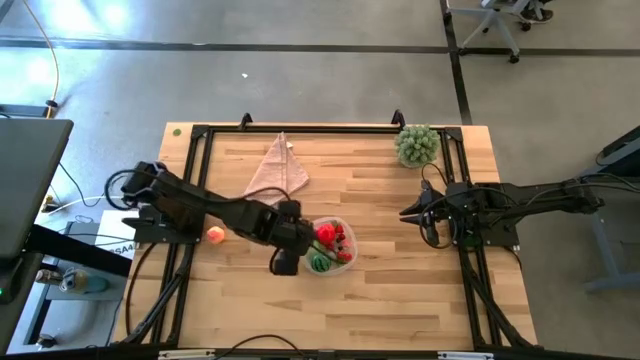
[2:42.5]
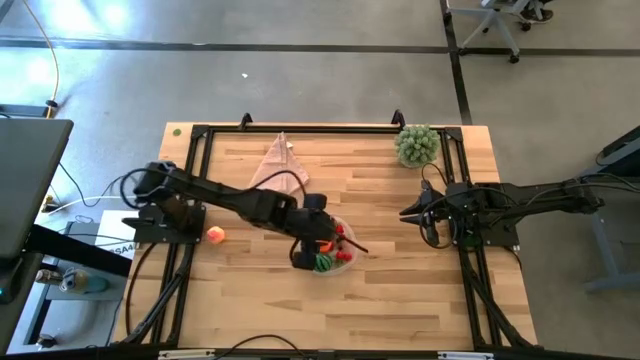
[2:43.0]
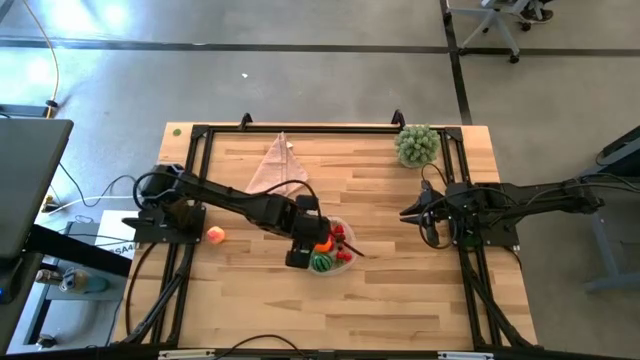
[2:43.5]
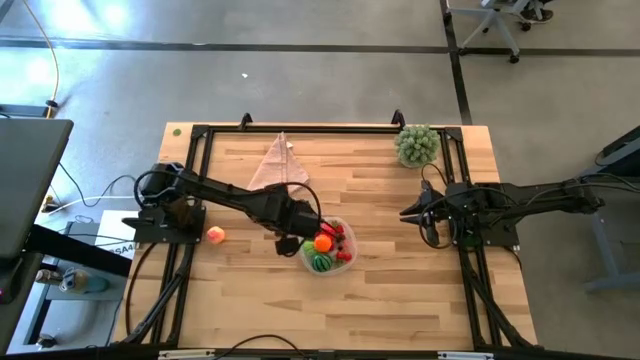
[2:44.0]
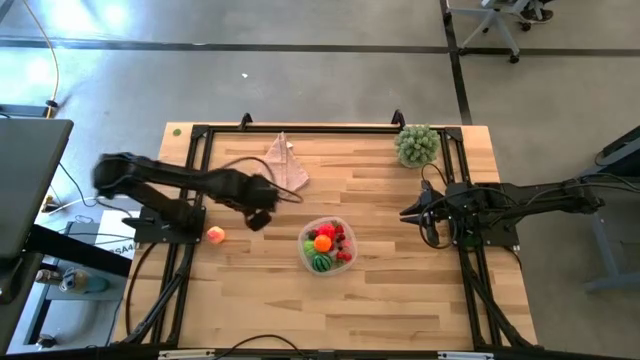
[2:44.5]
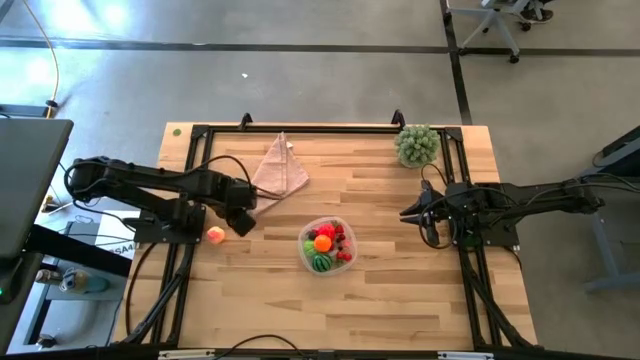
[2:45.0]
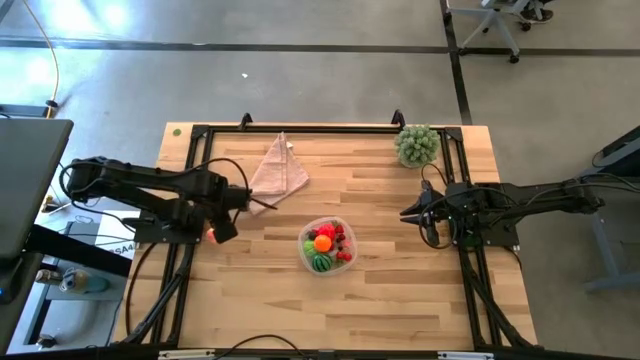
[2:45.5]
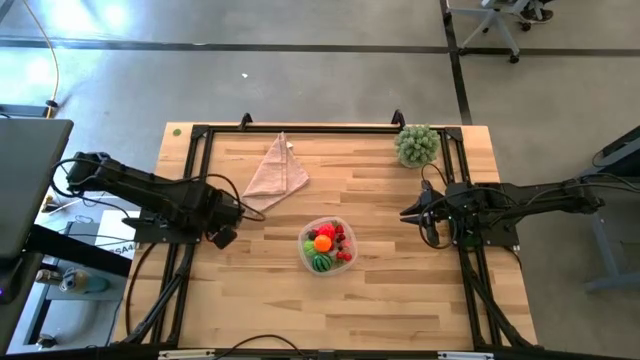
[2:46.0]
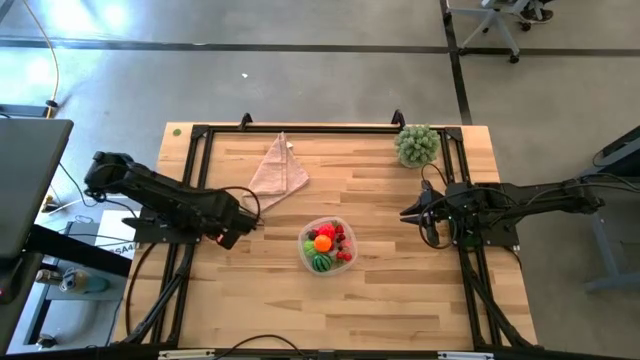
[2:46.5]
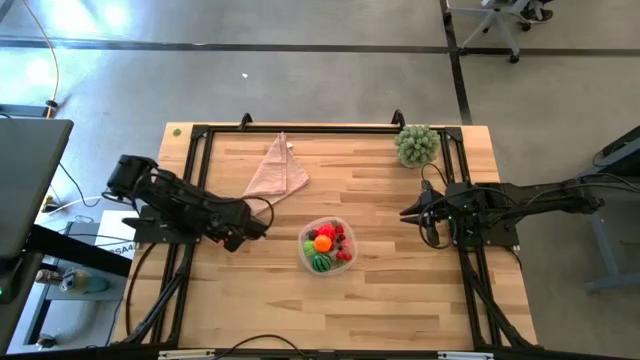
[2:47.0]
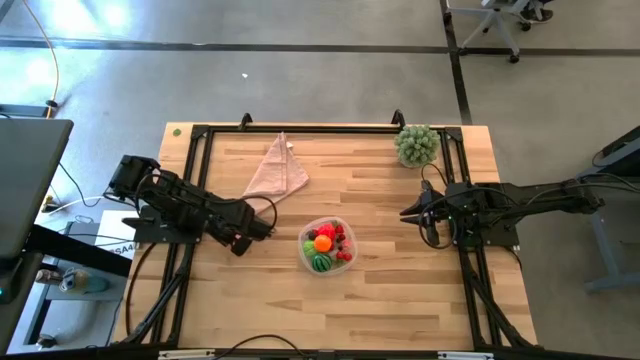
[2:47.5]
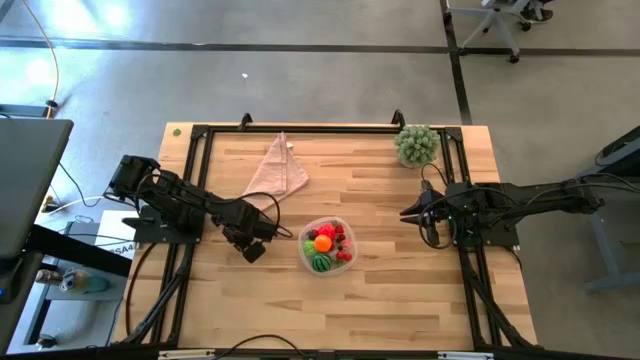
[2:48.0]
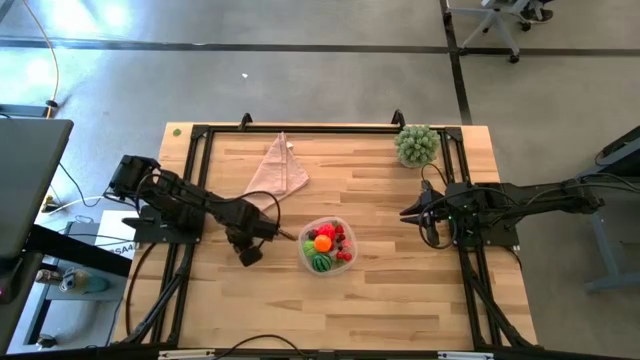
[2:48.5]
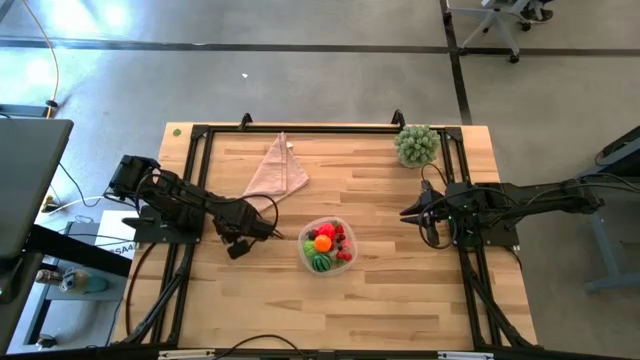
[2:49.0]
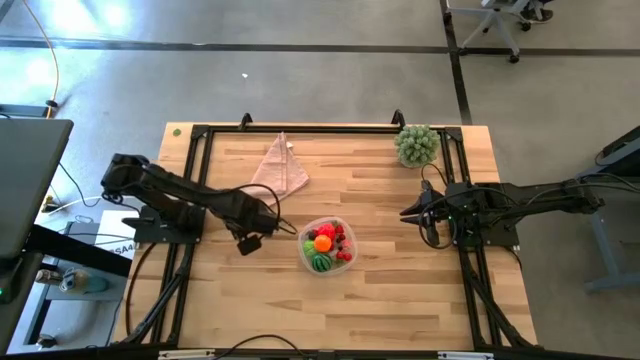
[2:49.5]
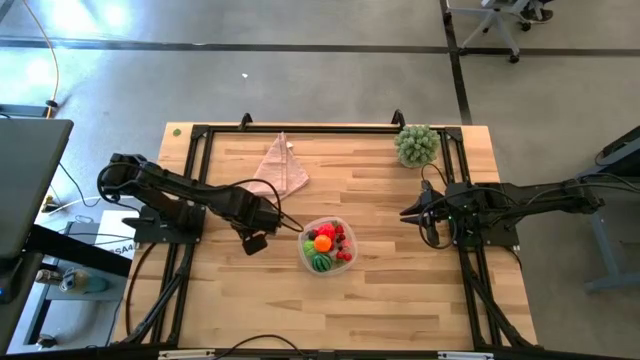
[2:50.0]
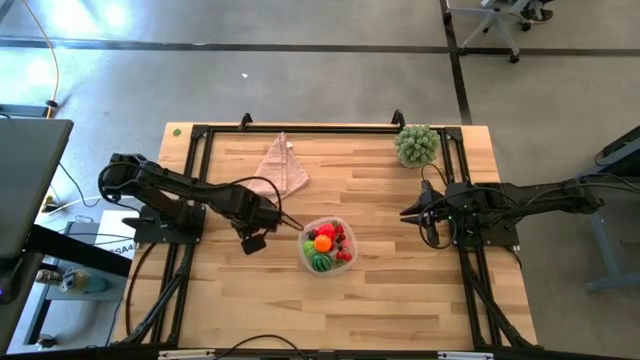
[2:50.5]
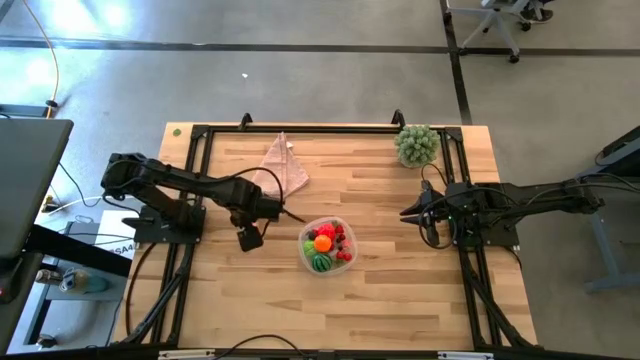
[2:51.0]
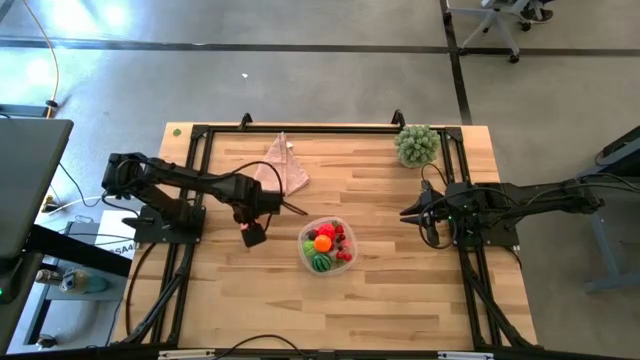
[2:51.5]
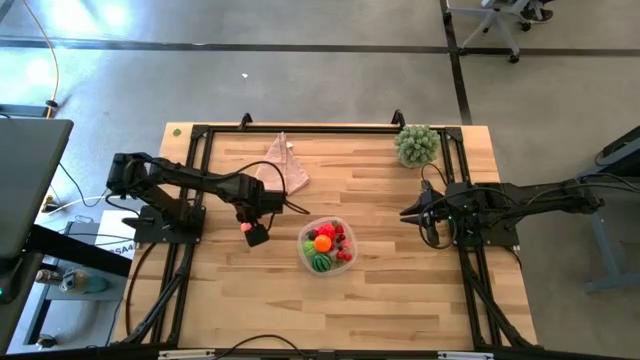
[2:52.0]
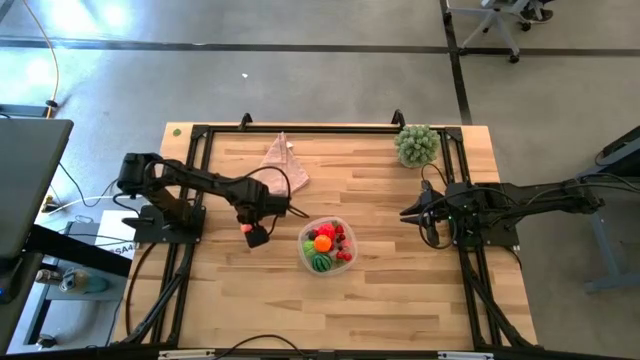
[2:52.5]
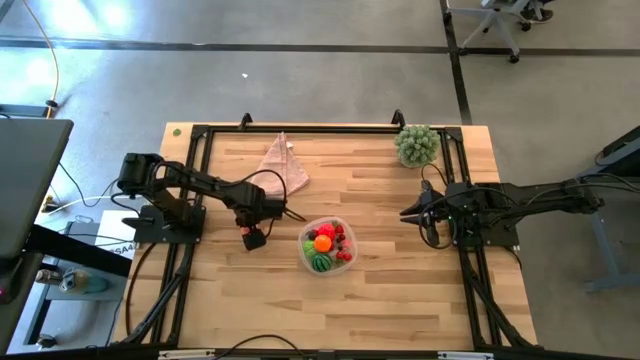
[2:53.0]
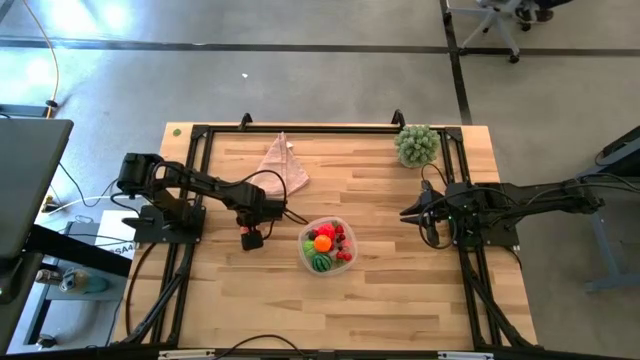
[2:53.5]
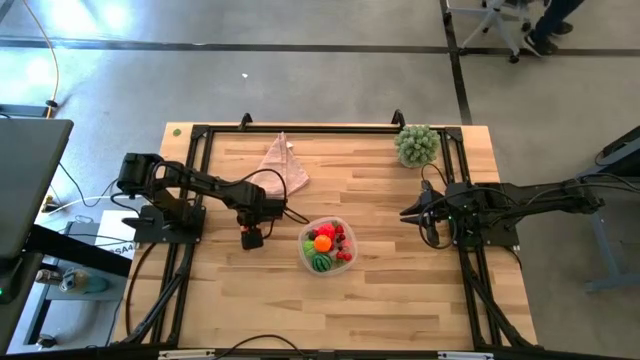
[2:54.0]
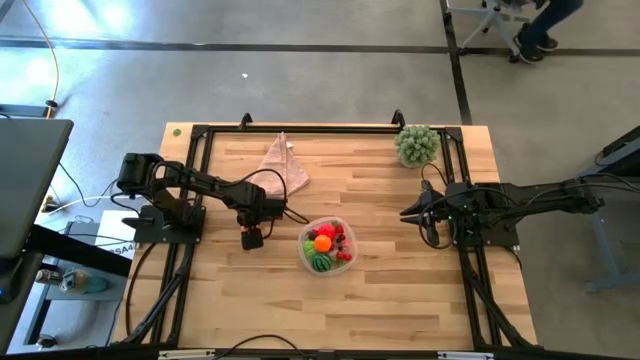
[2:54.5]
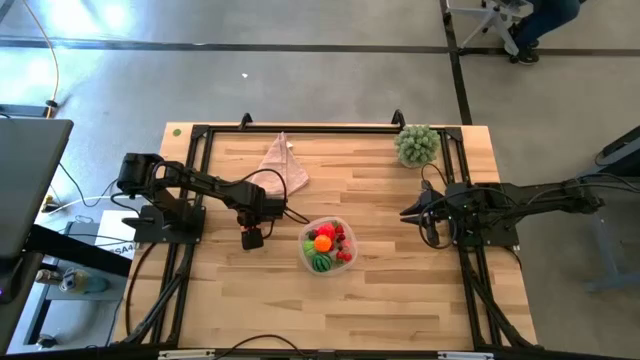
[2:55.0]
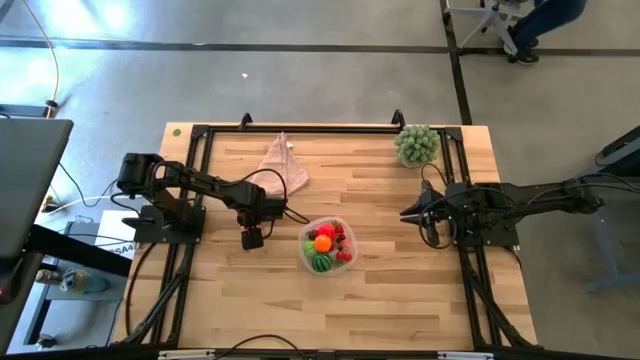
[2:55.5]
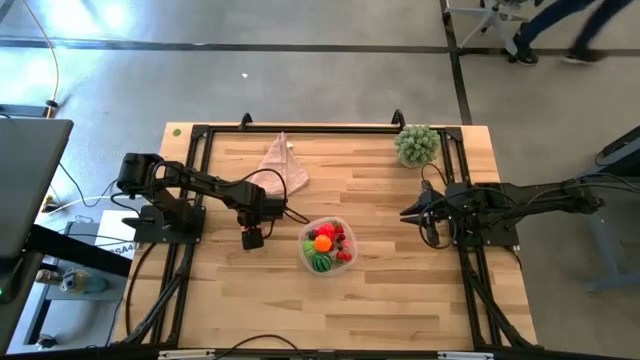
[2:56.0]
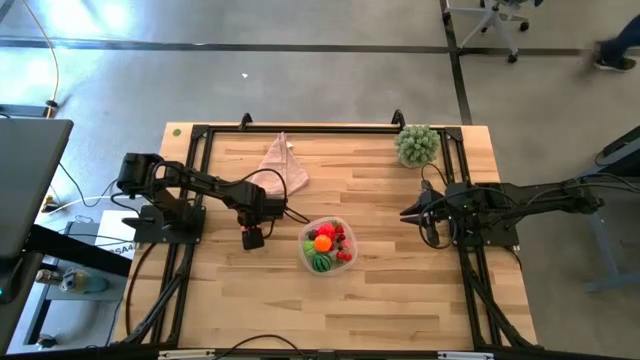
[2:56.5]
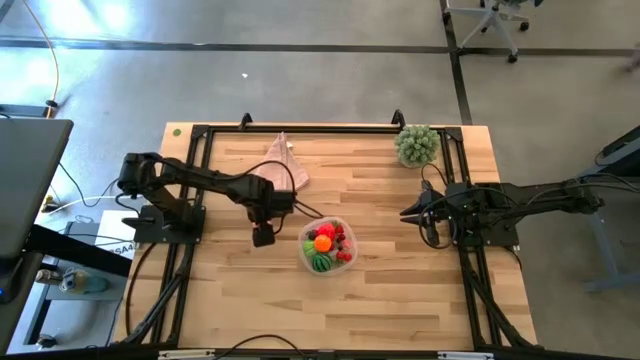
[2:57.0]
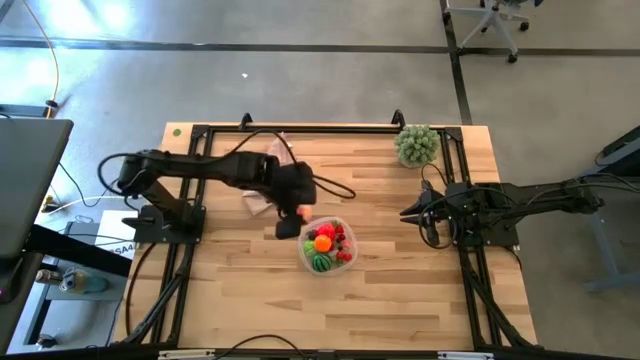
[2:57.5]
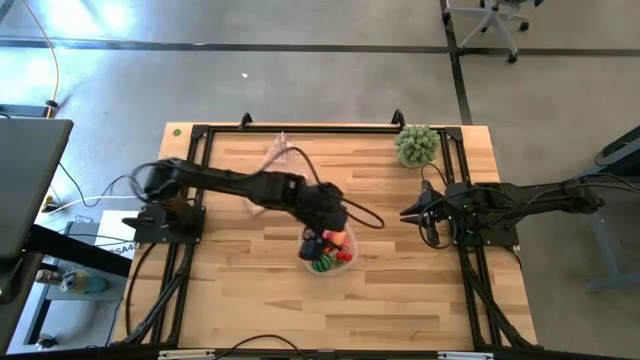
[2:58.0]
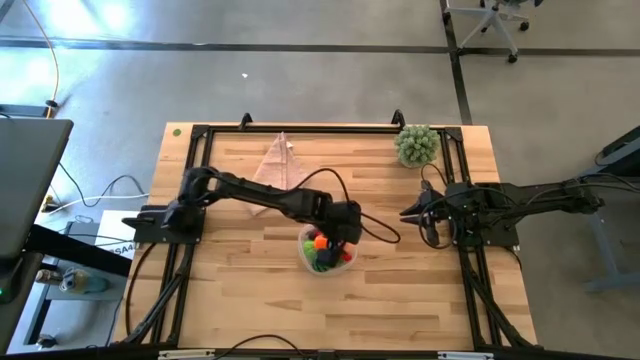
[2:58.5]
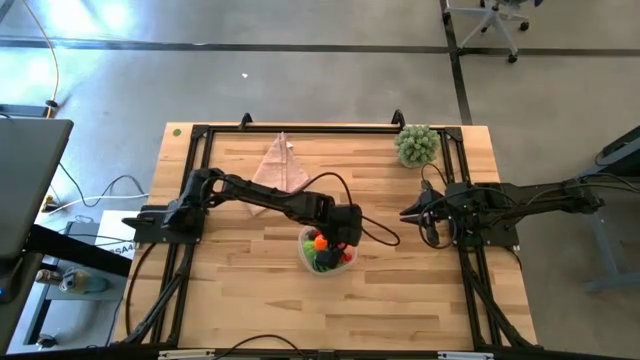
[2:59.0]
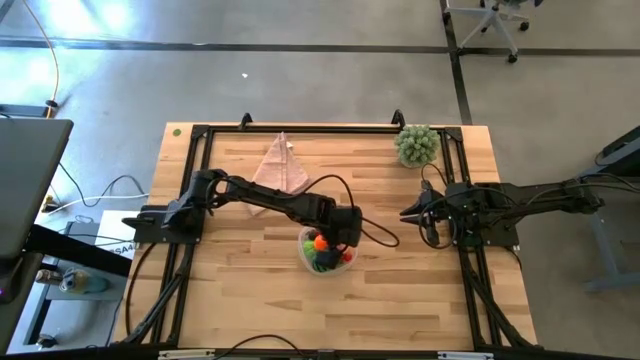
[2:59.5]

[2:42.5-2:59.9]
Task: Pick and placing Produce into tupperware
Put the peach into the transparent bin

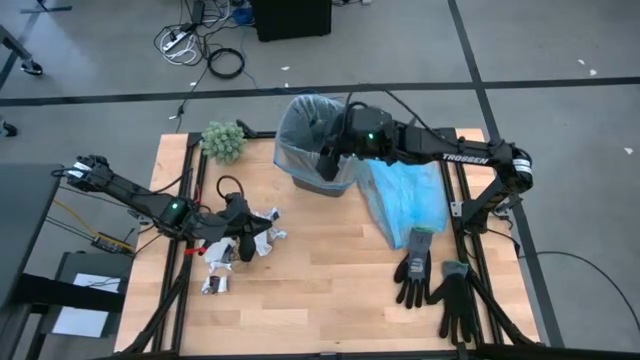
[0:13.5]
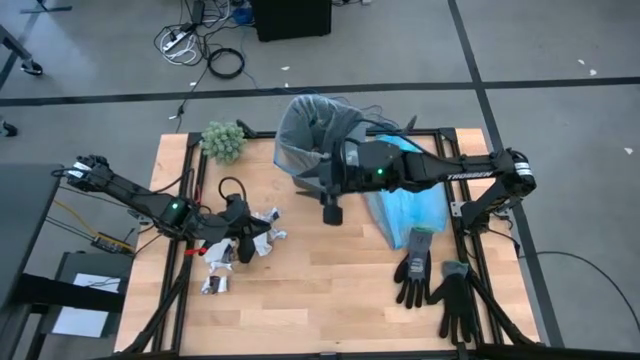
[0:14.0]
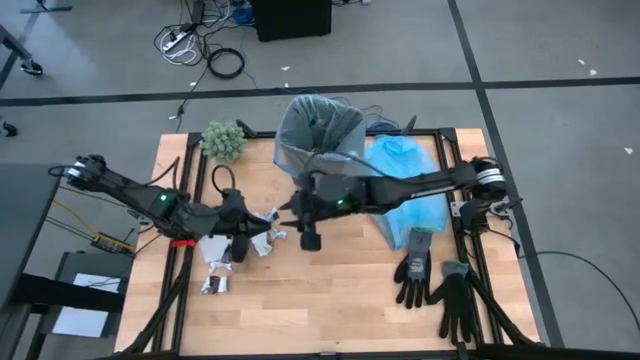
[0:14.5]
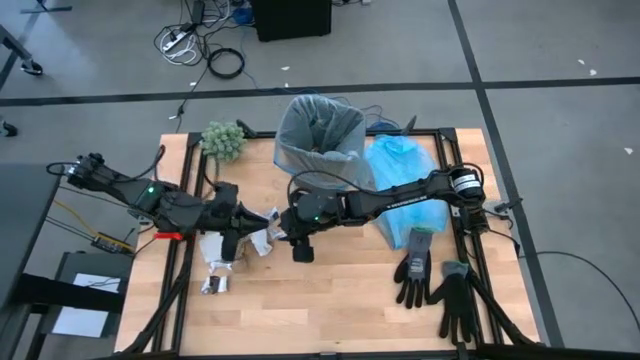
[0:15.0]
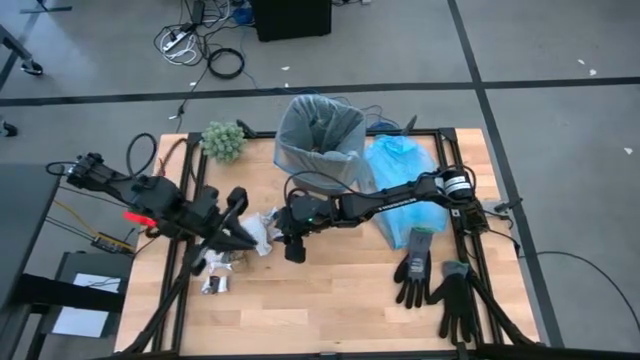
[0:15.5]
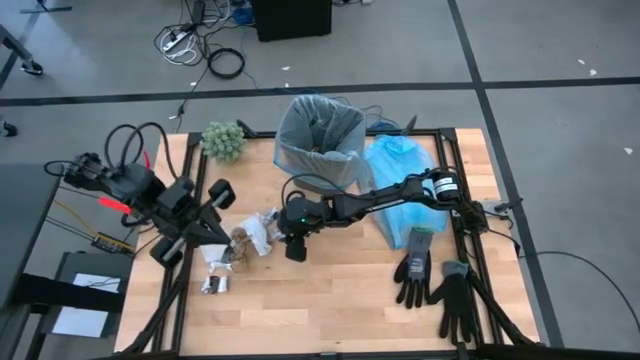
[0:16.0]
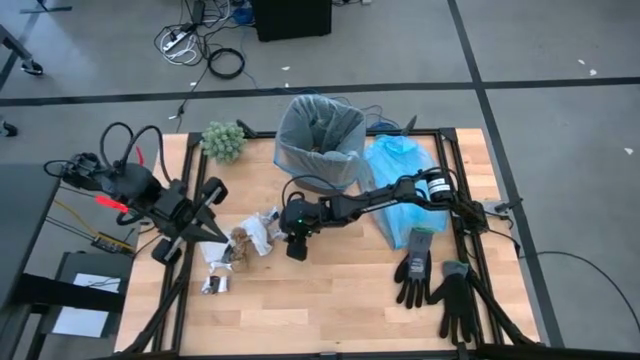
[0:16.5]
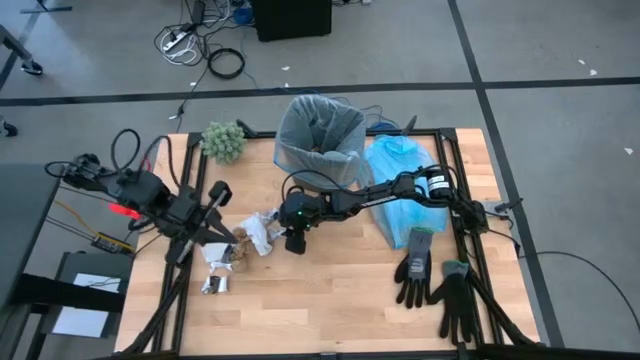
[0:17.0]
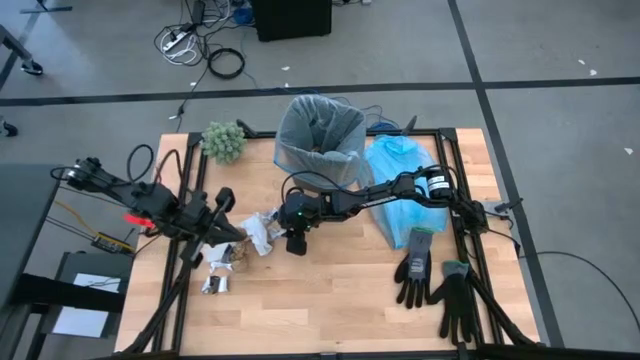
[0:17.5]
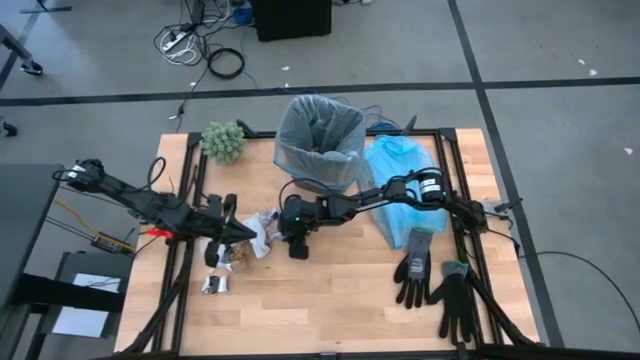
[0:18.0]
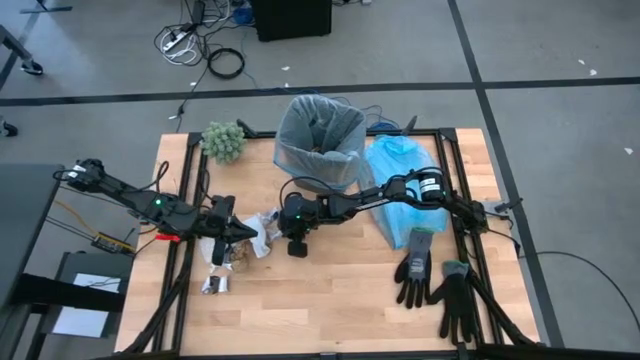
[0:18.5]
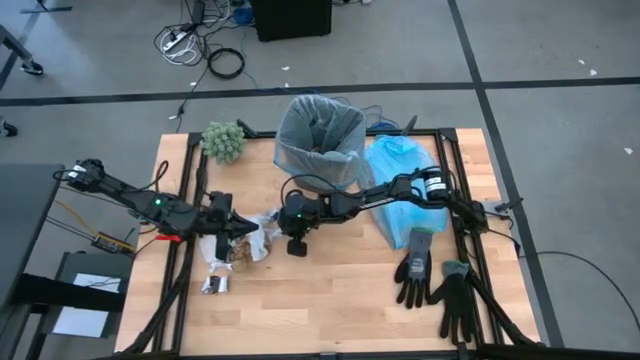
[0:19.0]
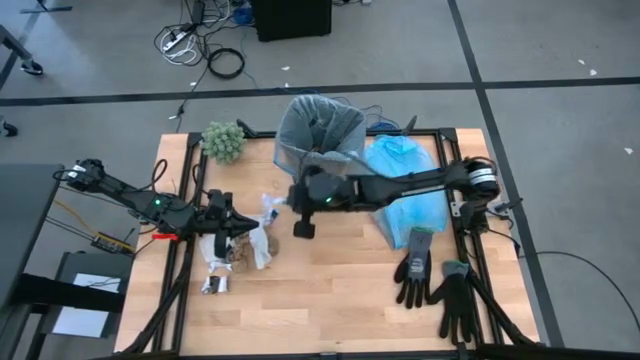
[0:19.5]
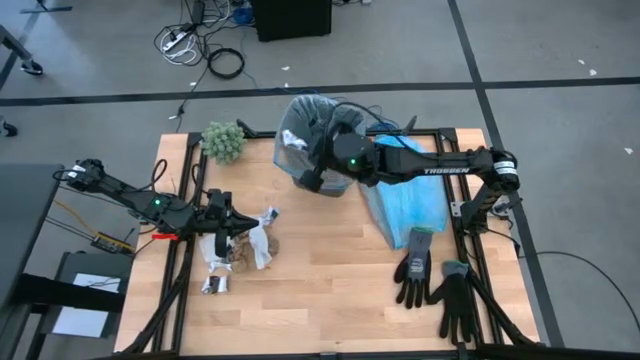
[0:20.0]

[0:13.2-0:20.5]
Task: place trash/remove bag and relplace
Put the white paper into the trash bin
